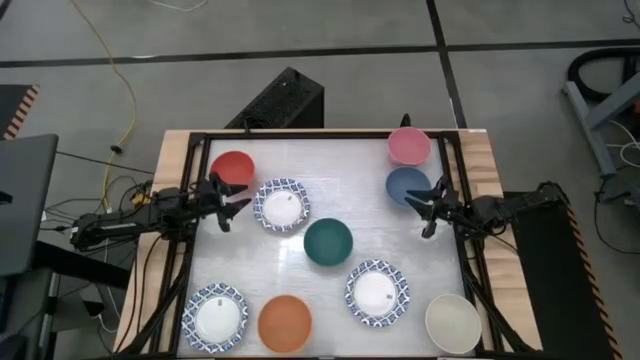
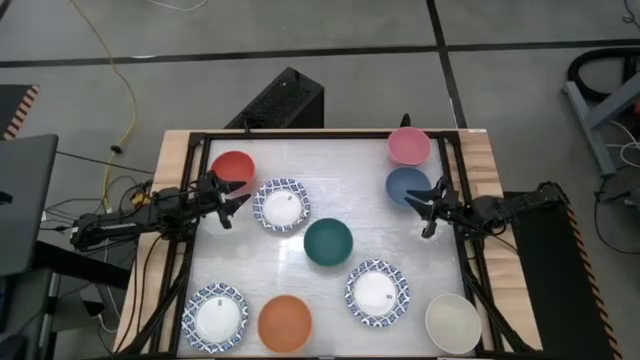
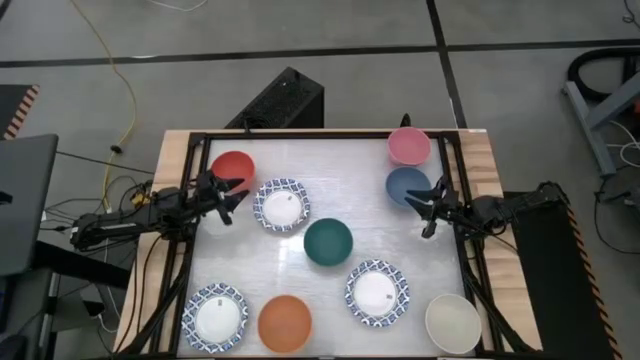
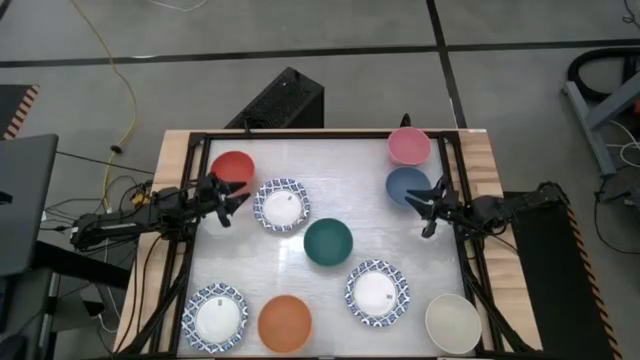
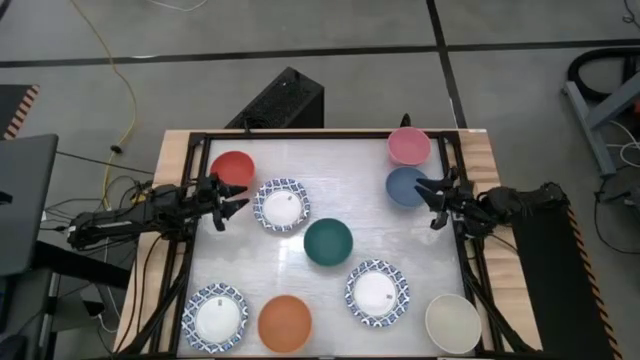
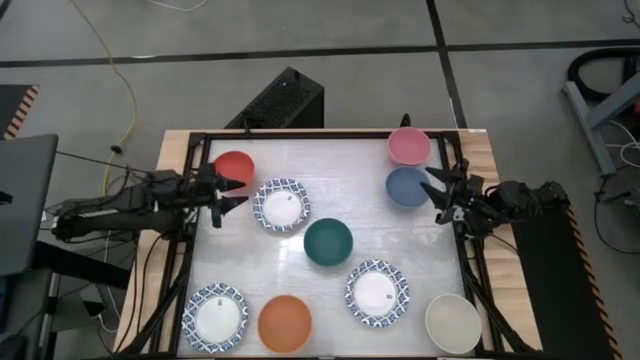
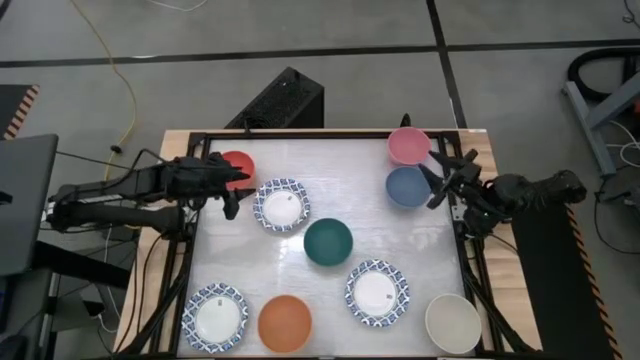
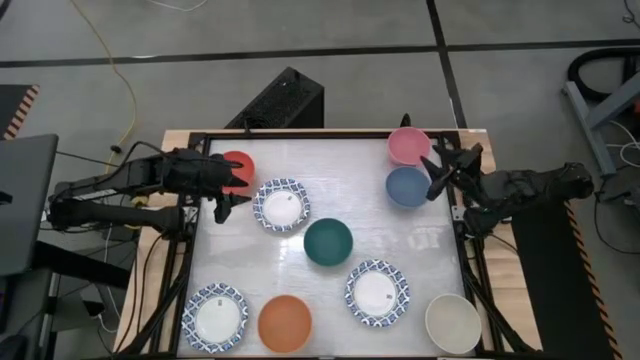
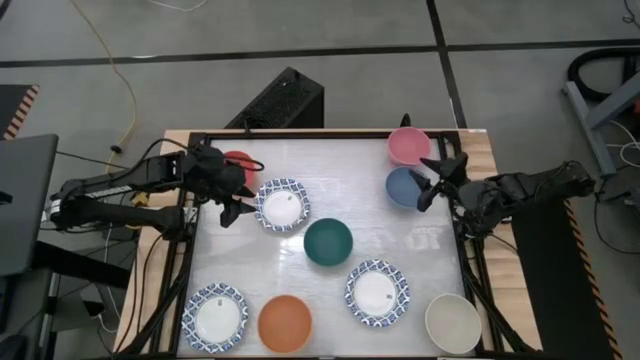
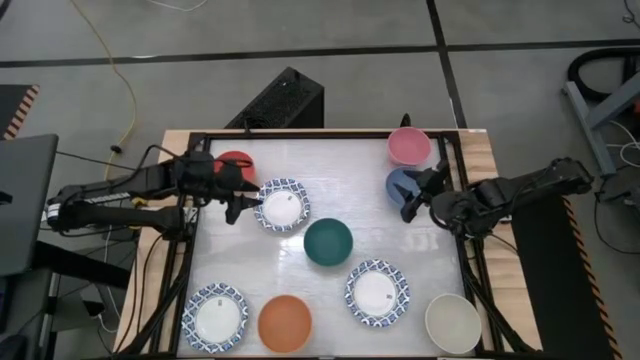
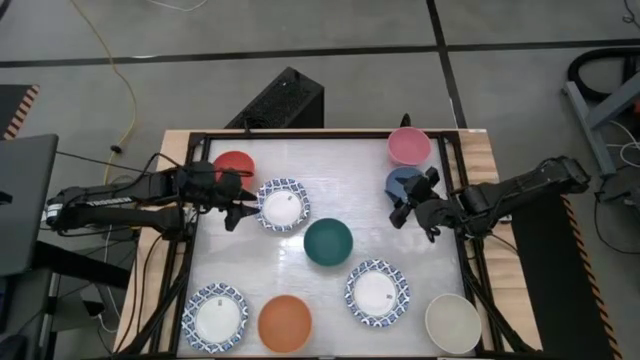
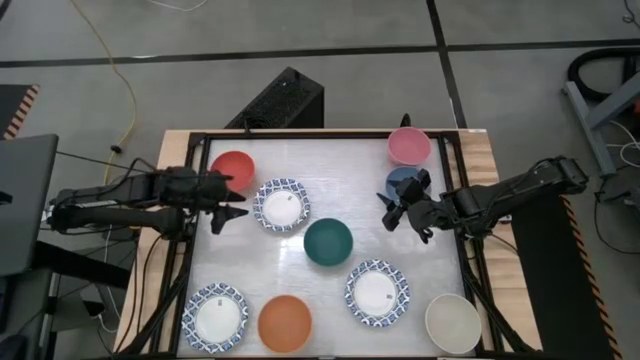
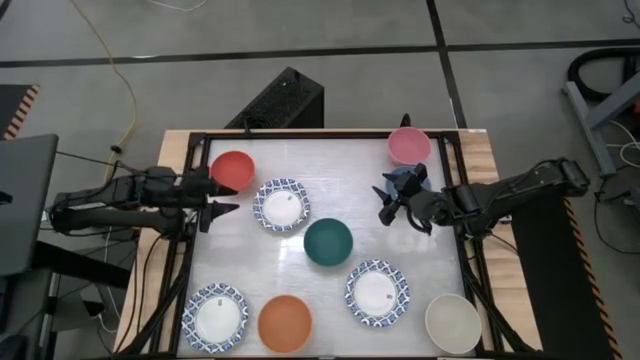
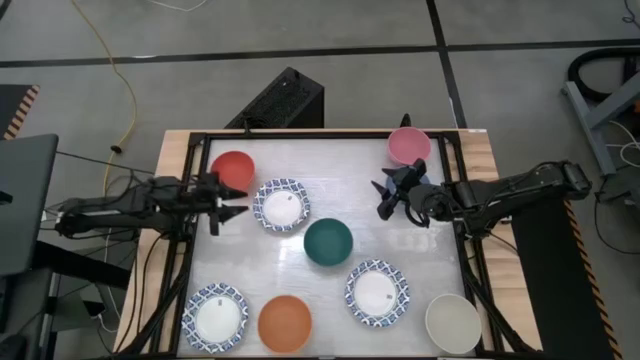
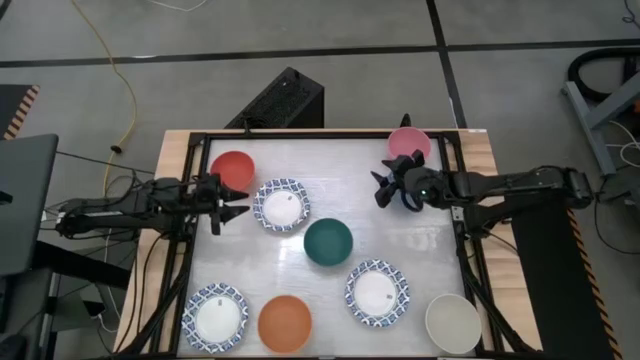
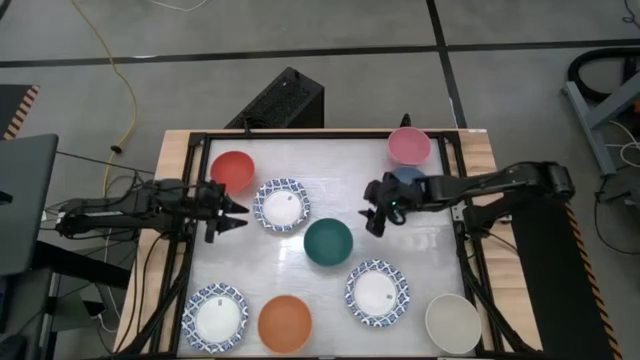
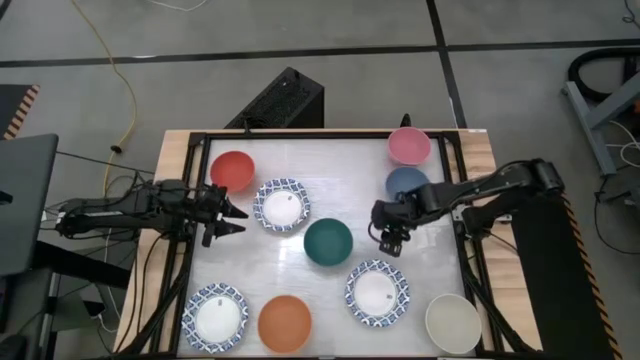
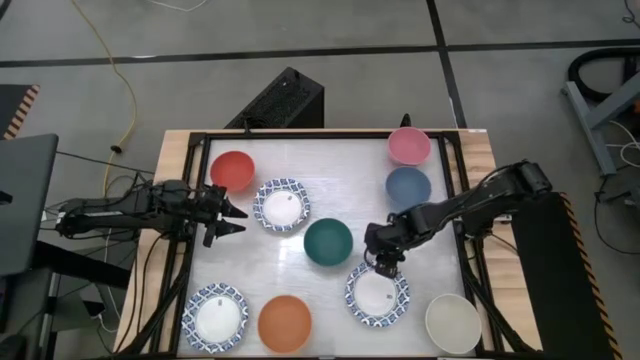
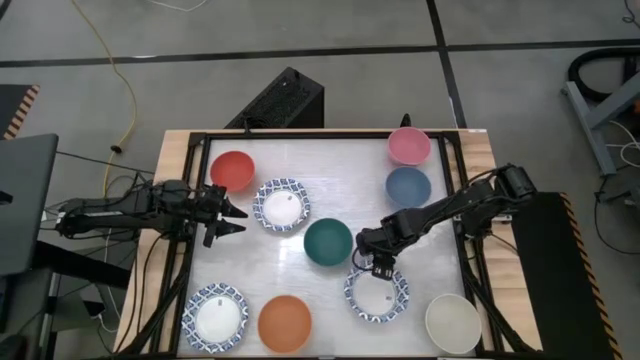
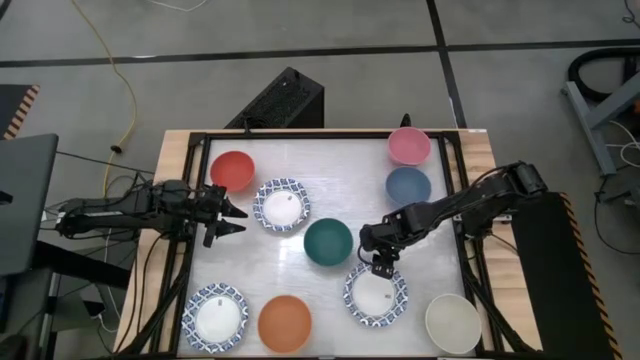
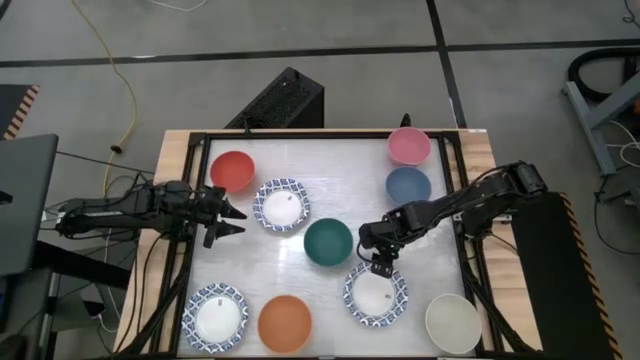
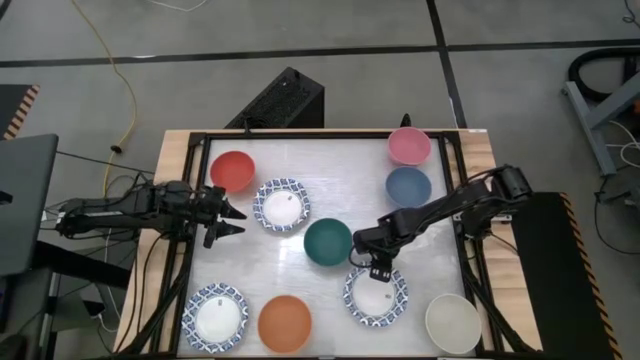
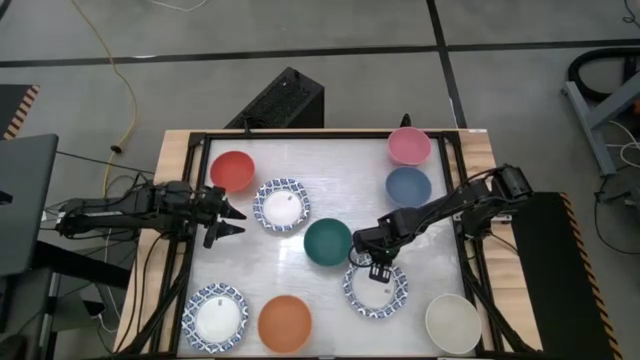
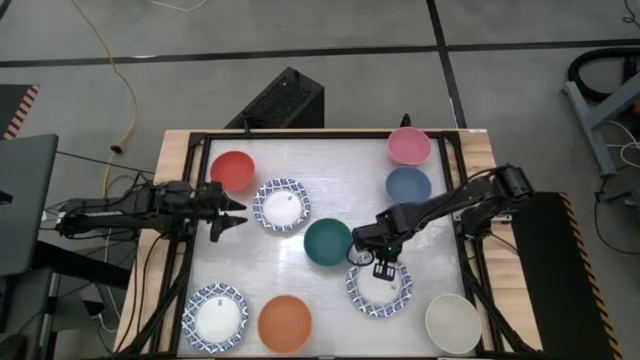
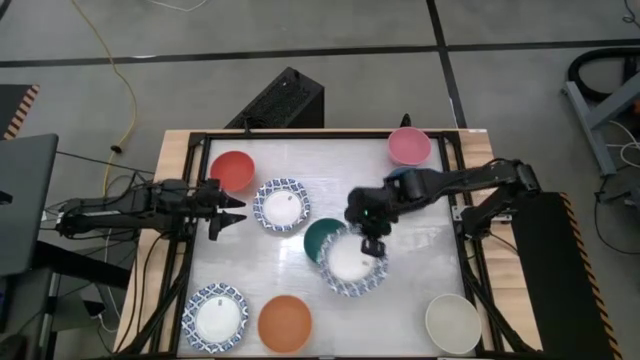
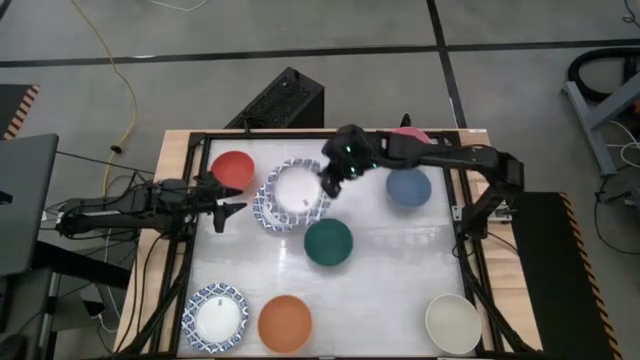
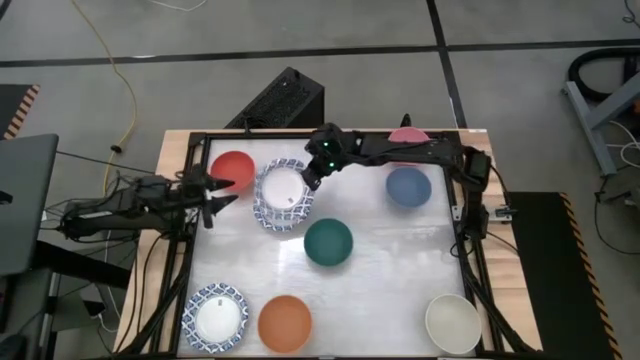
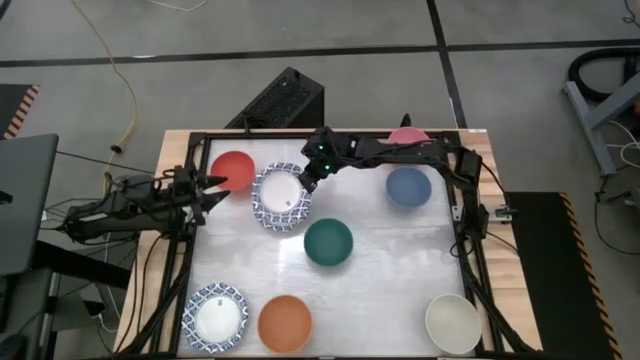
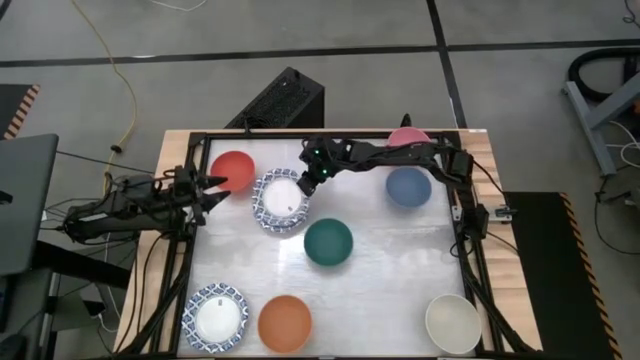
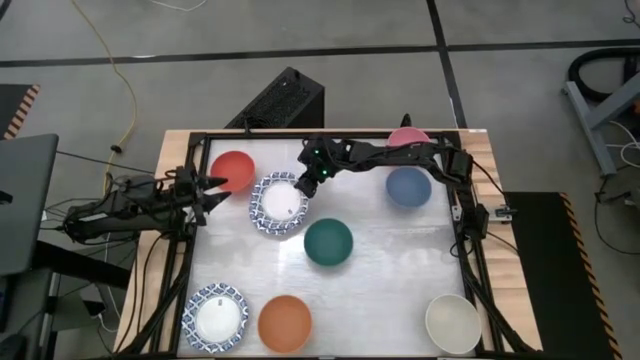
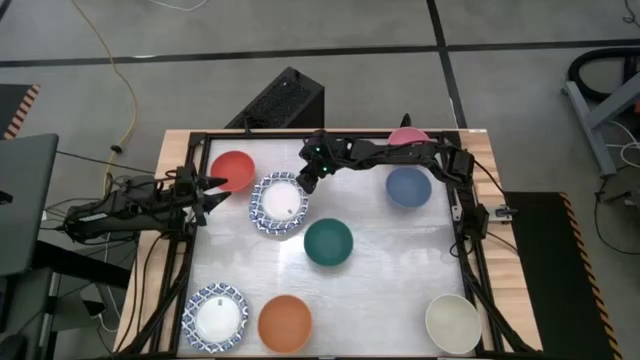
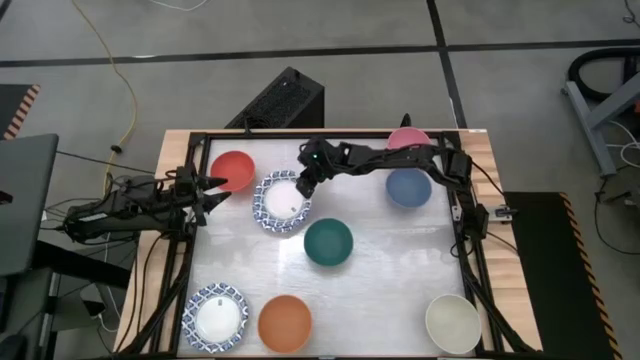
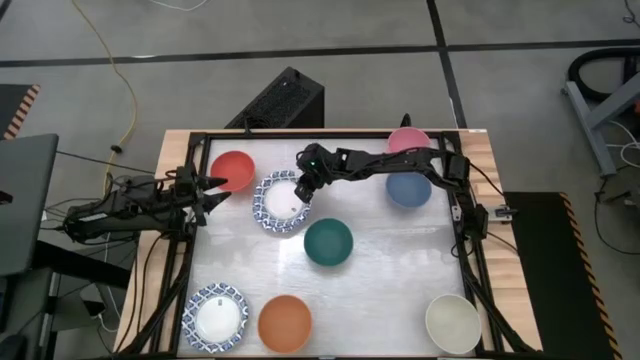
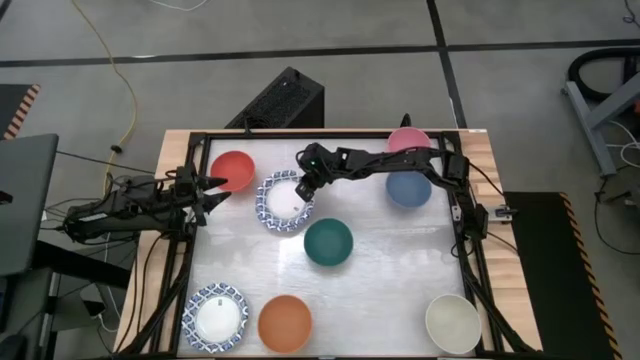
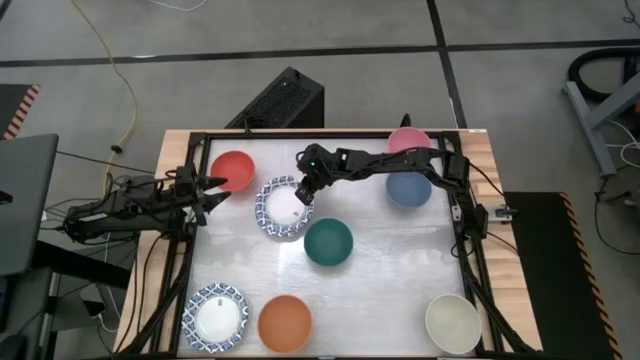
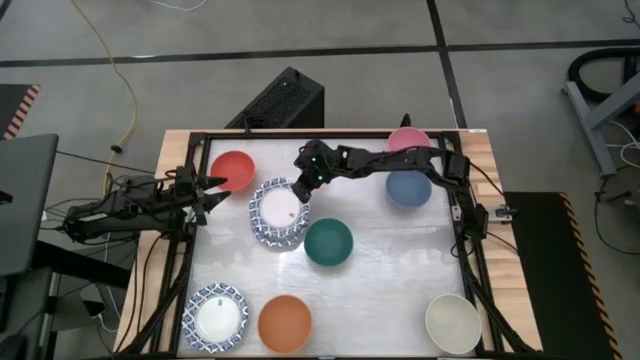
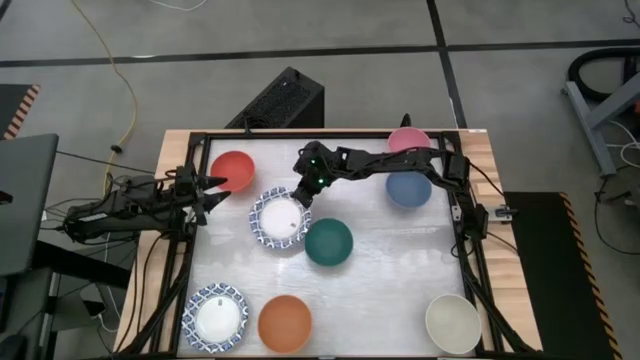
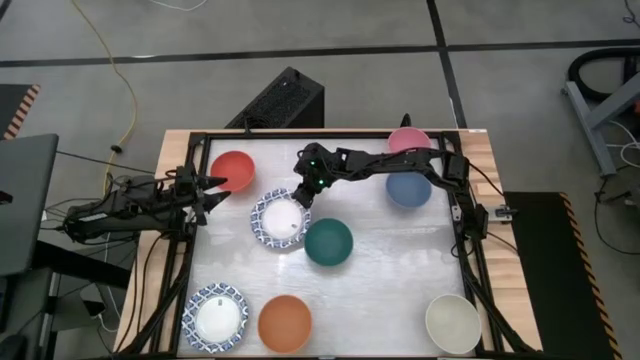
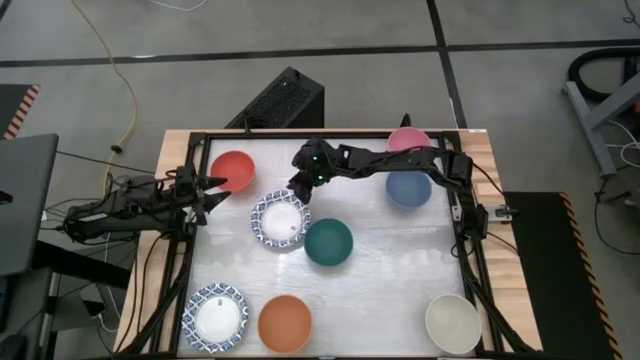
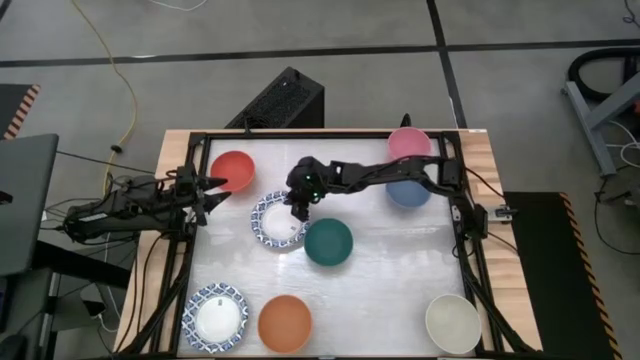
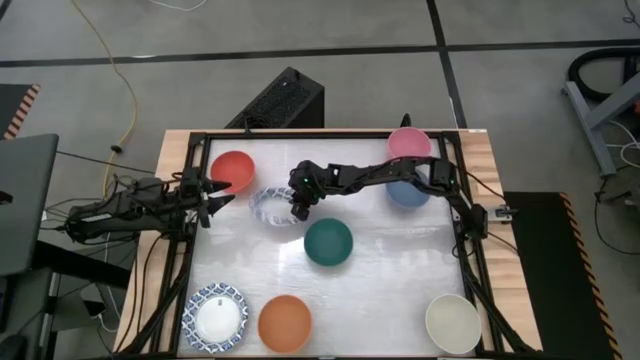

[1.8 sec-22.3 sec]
Stack the bottom right blue patterned bowl on top of the other white bowl
